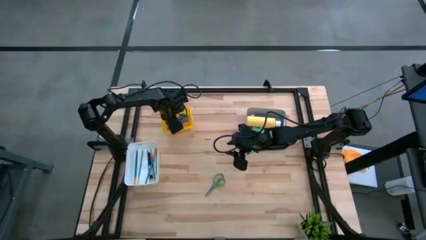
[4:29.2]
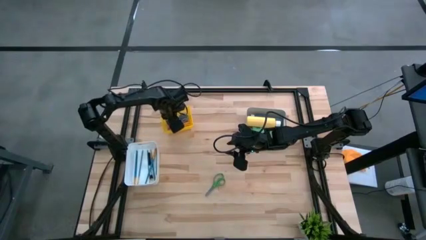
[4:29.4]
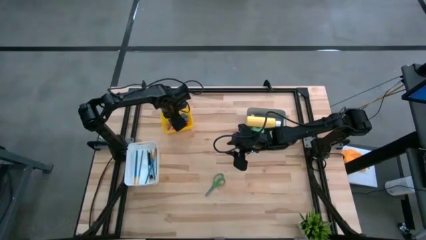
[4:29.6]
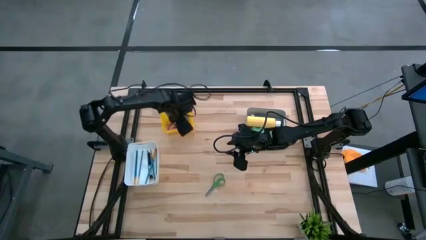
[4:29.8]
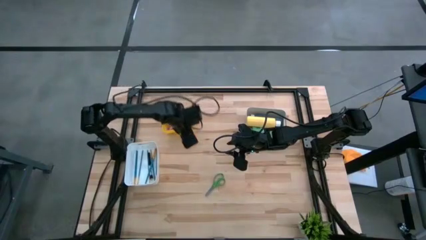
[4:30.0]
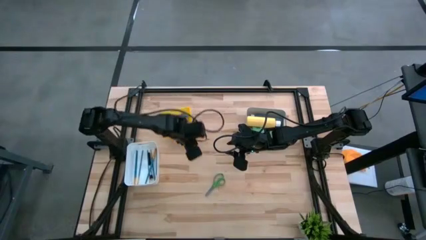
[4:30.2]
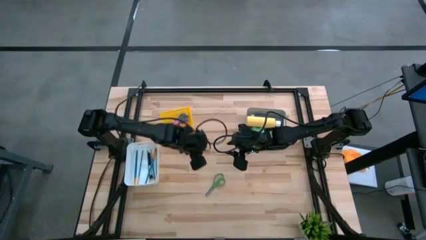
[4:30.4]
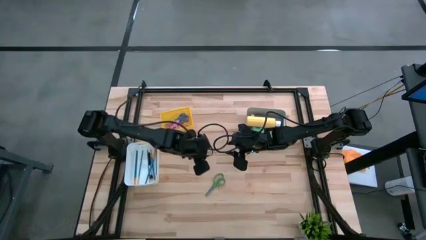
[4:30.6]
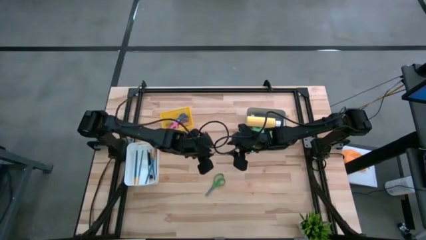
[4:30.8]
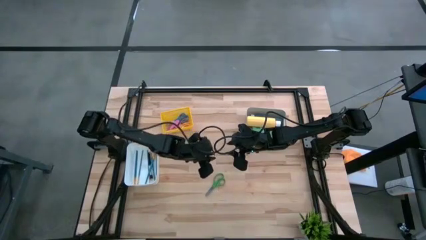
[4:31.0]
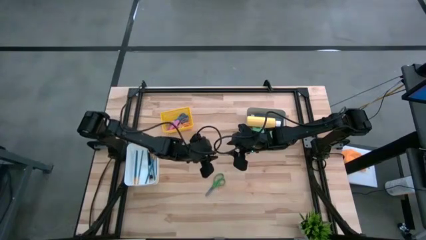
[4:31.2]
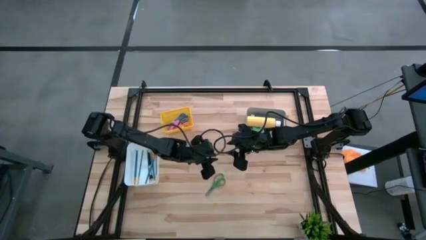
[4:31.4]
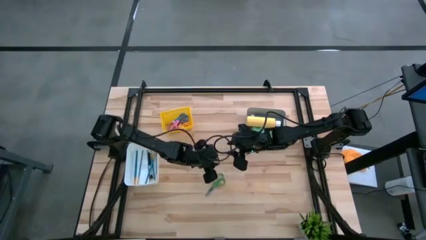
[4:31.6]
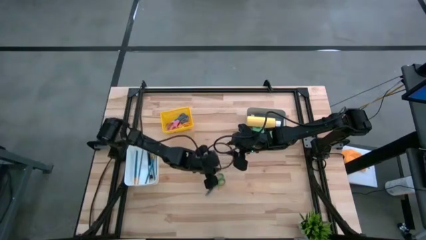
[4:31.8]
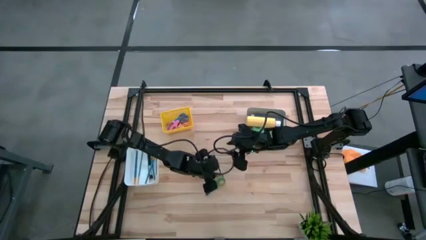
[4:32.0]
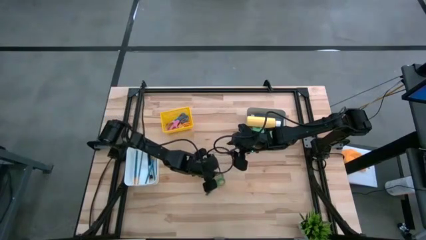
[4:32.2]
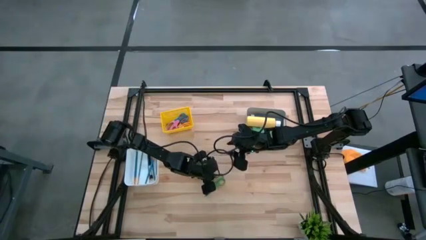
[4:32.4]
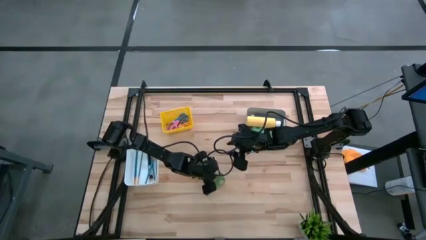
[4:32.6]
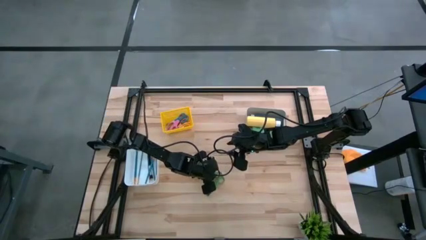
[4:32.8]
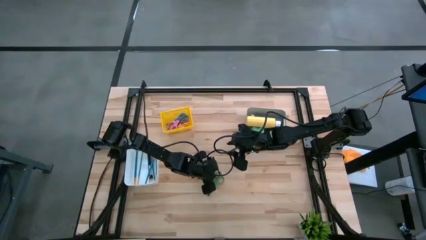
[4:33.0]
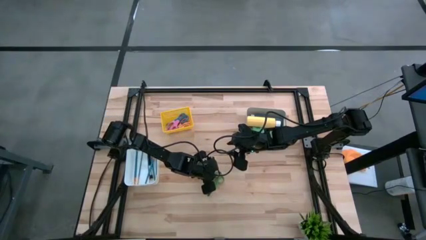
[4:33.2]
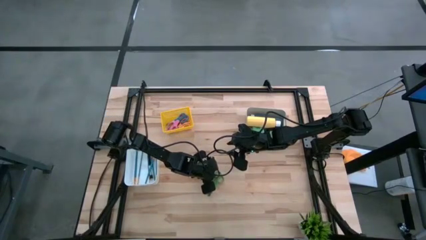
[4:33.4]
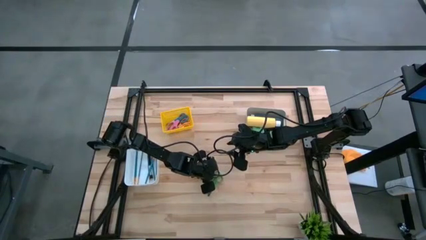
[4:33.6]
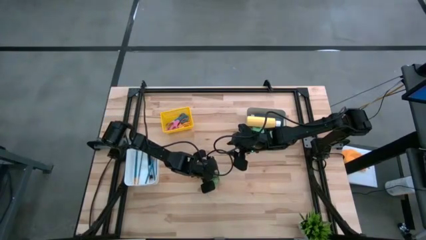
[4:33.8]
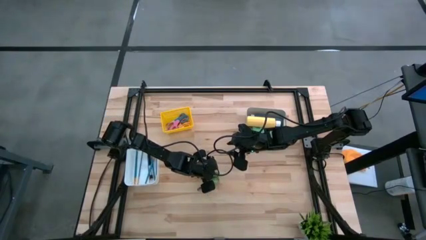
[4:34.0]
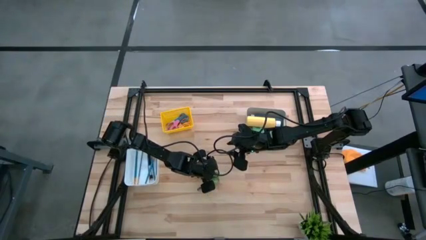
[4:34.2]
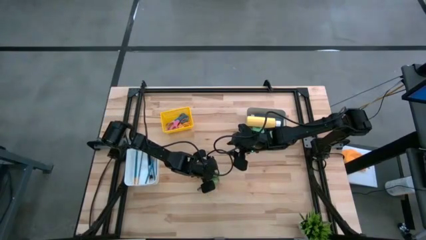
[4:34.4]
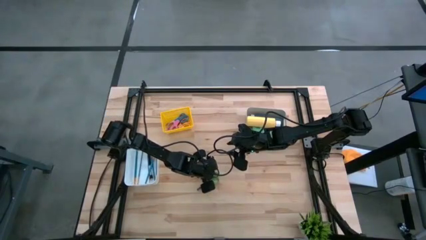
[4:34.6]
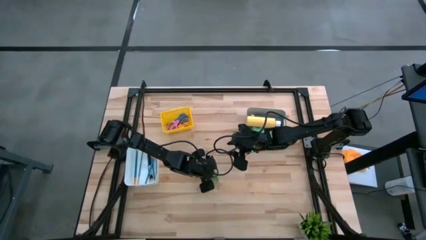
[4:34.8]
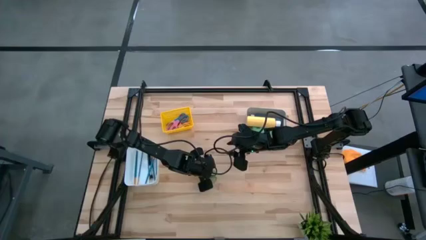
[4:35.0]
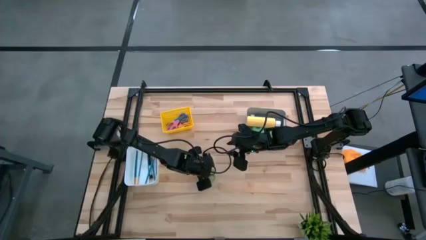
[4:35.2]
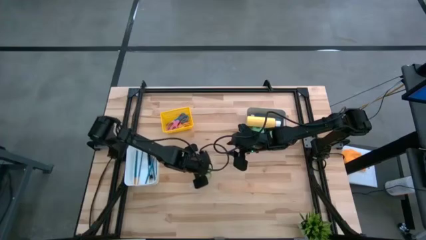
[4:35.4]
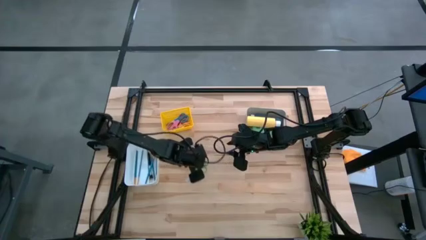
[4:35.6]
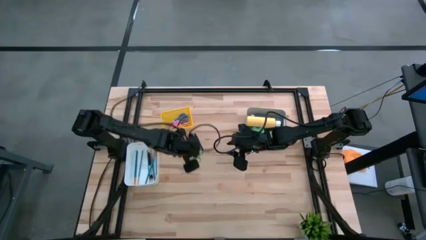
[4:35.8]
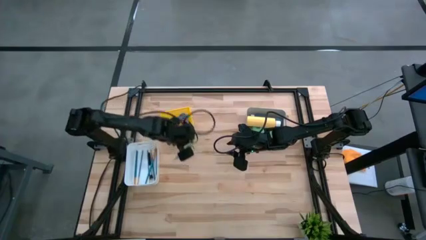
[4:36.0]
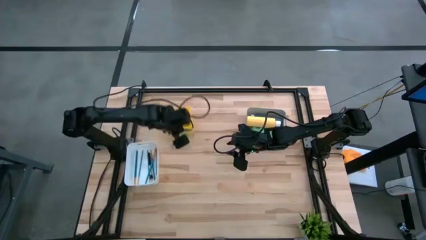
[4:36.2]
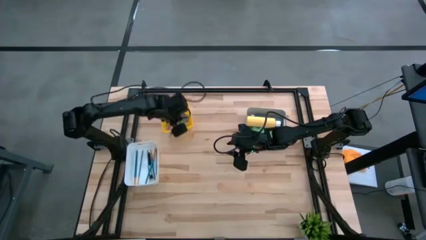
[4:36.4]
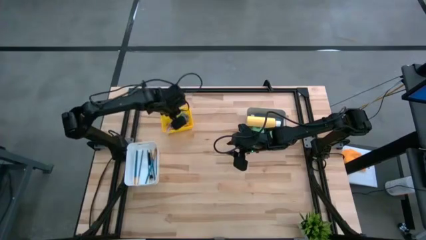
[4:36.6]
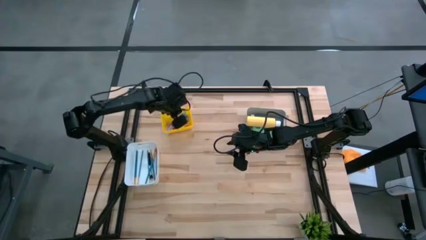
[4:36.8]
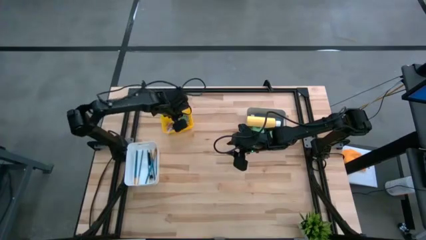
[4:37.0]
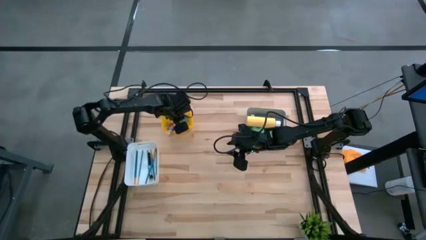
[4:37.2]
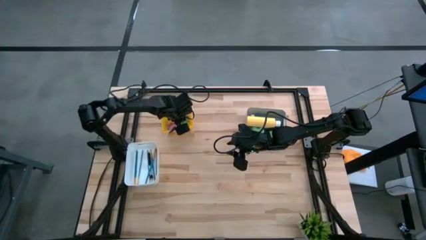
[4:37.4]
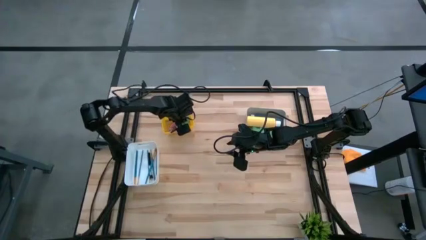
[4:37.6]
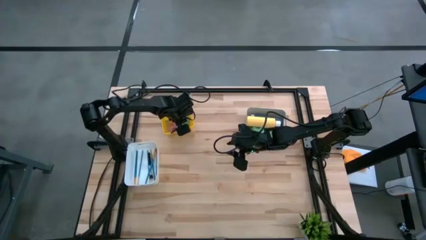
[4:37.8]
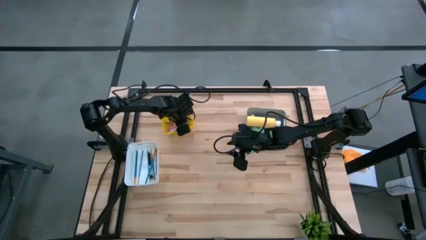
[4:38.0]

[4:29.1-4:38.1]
Task: Pick & Place Paint Supplies
Put the green scissors into the yellow bin

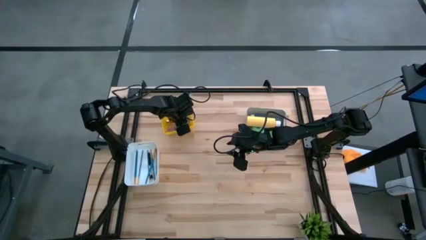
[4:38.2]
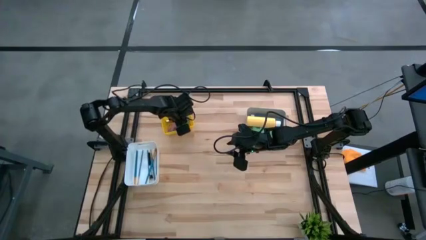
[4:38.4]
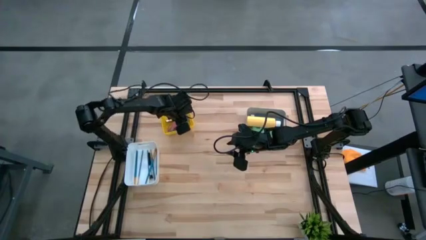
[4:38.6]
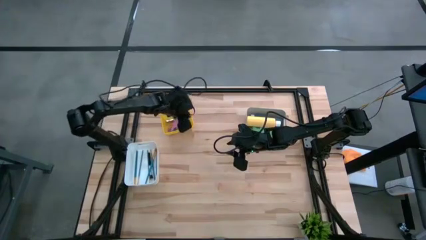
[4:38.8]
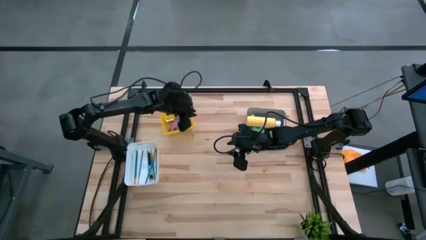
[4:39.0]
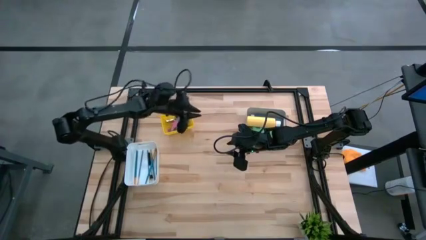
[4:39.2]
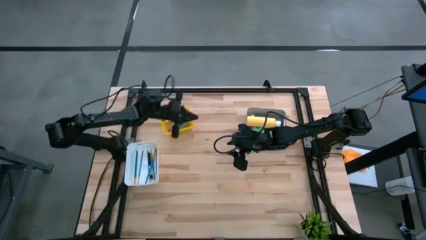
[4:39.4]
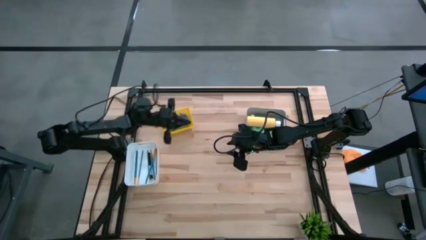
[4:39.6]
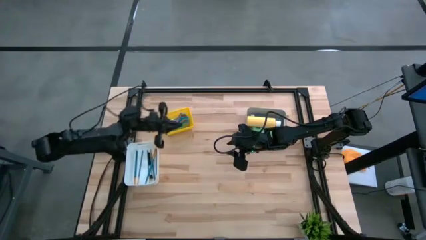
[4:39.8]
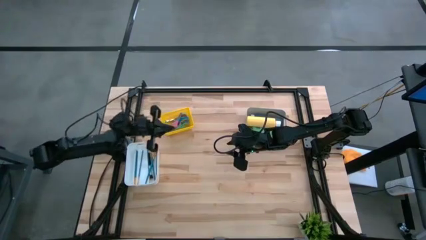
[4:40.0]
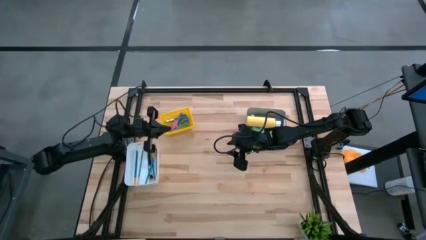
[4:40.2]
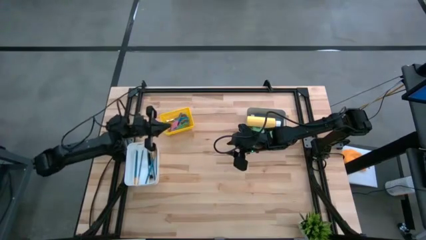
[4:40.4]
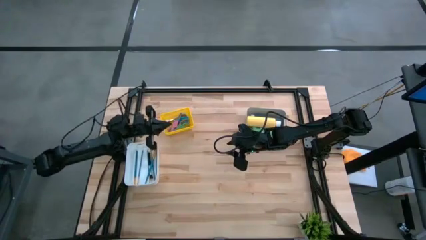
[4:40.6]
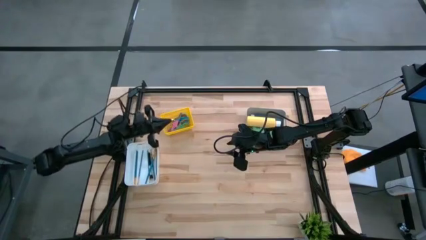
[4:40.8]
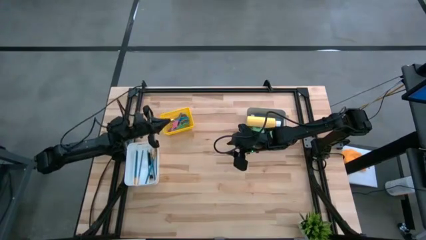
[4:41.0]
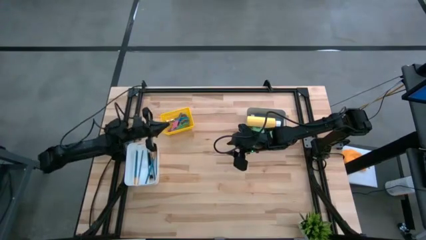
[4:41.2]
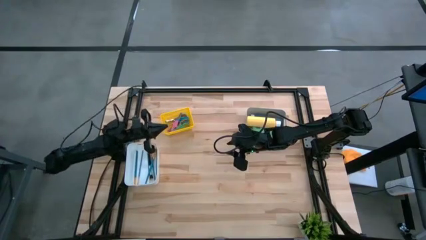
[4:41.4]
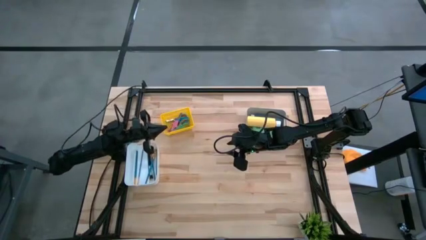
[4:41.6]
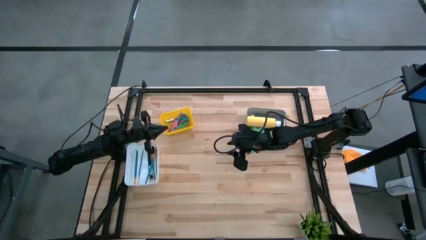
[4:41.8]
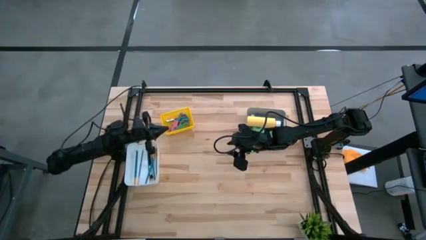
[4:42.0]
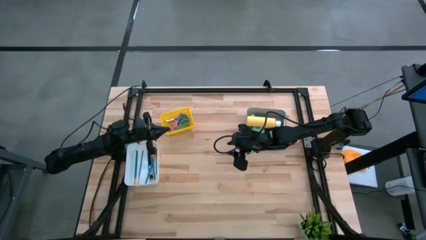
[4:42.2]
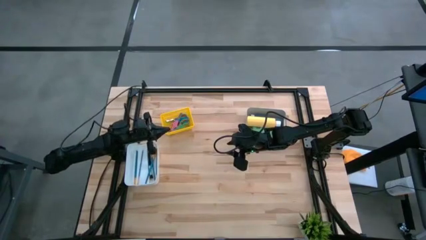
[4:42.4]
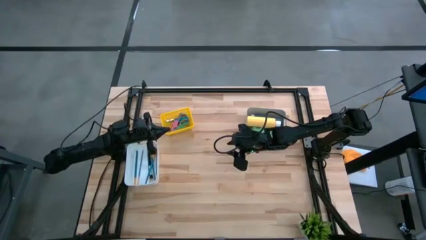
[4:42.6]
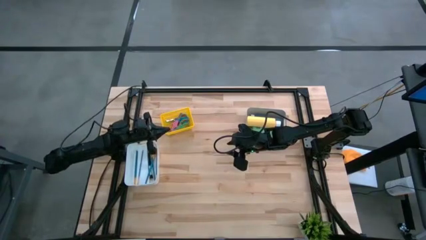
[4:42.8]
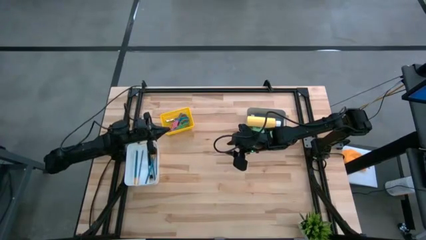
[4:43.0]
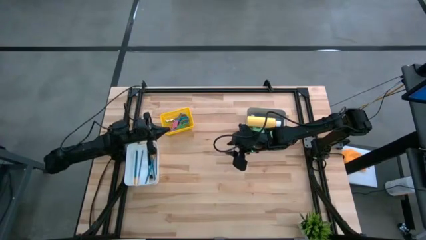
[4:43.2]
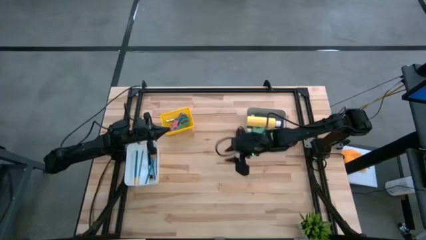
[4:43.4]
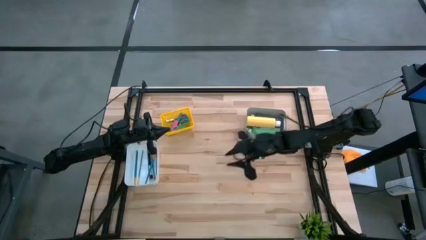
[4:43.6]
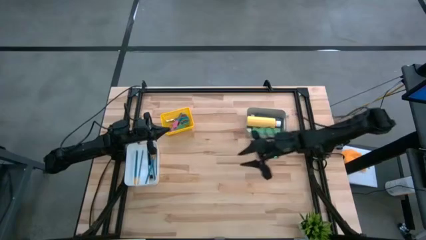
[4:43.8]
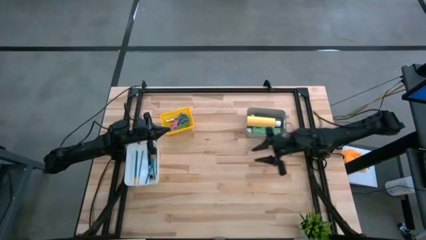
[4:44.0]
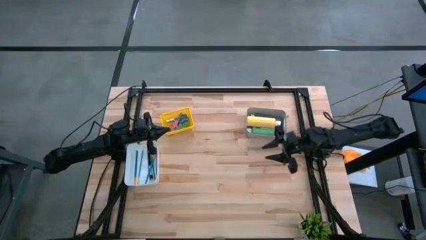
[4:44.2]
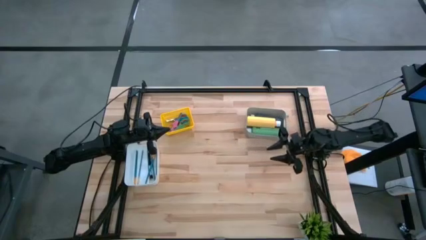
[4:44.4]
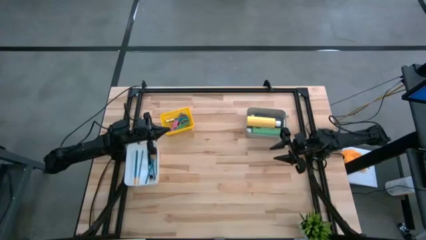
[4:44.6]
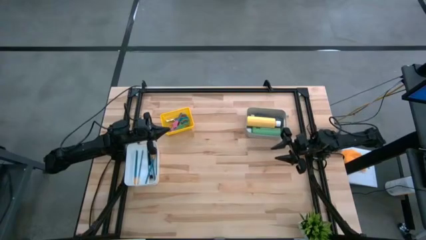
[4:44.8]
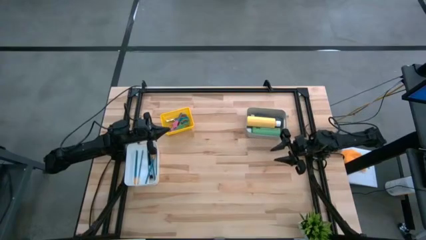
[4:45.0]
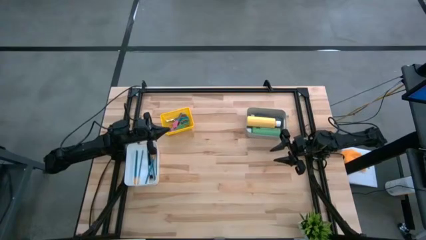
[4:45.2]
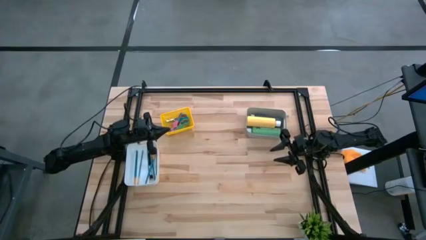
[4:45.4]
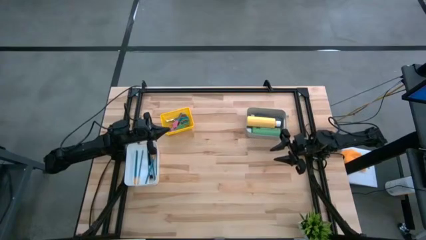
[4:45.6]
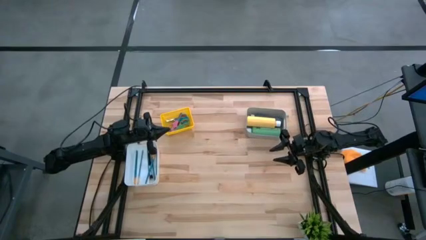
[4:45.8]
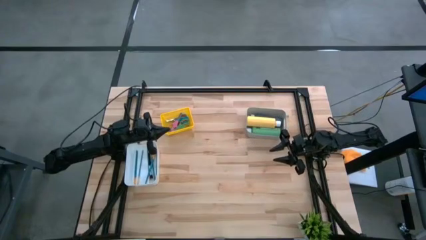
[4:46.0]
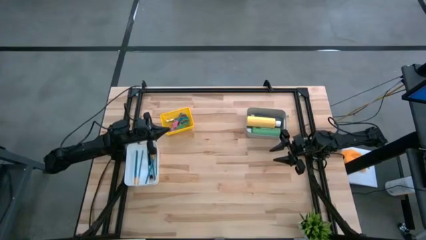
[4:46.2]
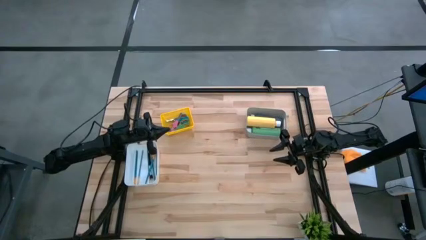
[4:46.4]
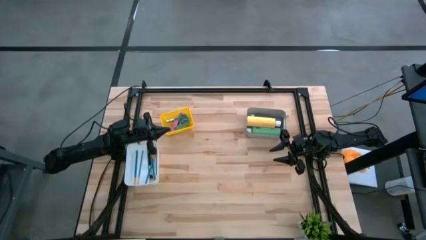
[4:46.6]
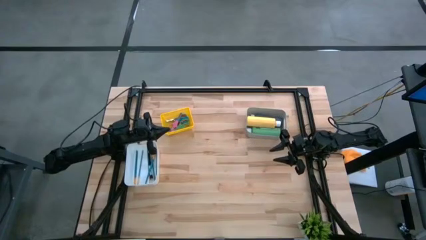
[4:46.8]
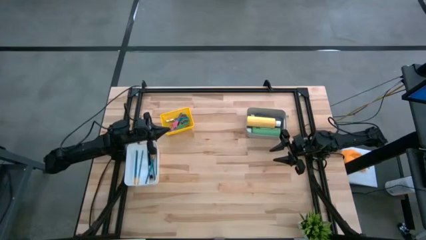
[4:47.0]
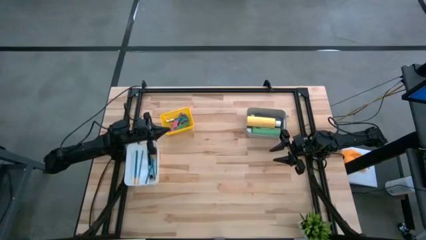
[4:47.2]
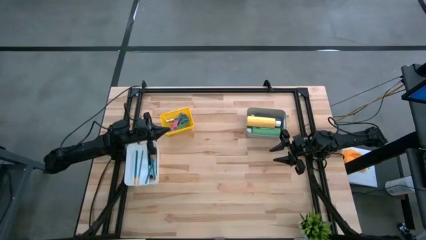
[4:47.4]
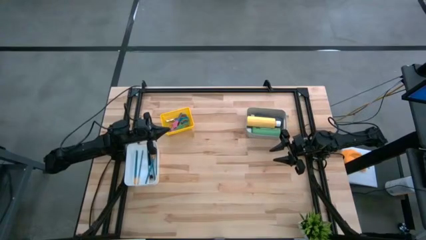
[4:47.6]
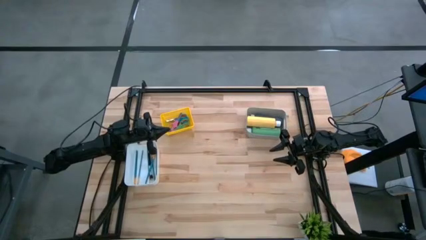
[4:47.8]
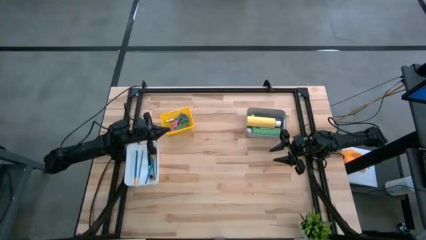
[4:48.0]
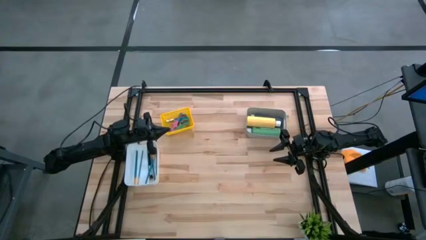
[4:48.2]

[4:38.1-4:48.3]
Return to Home Position
